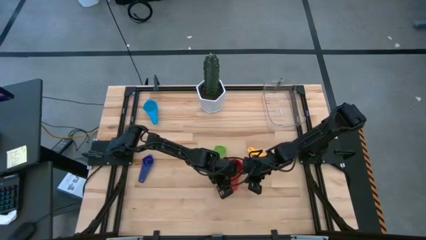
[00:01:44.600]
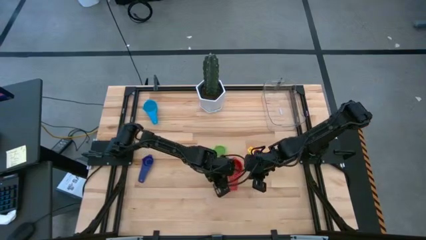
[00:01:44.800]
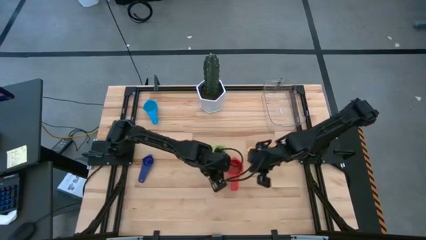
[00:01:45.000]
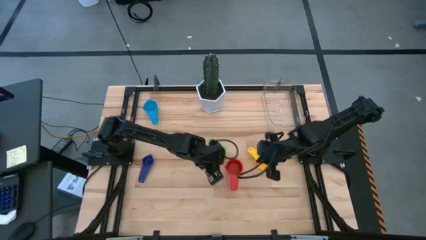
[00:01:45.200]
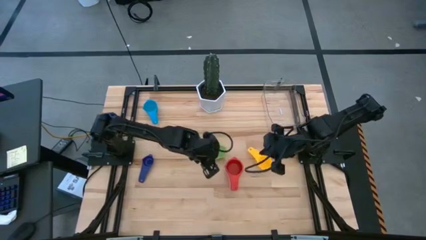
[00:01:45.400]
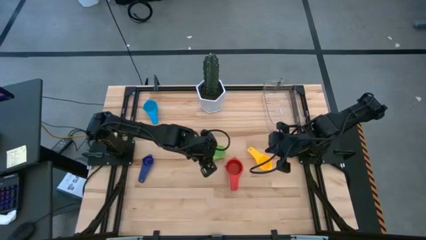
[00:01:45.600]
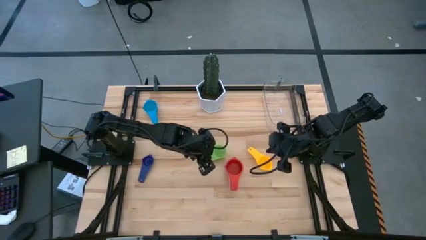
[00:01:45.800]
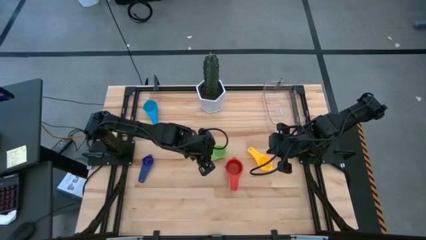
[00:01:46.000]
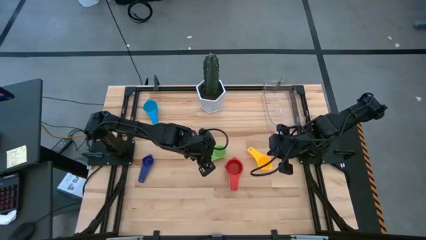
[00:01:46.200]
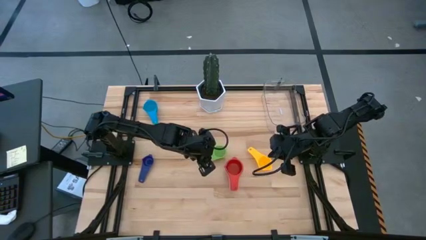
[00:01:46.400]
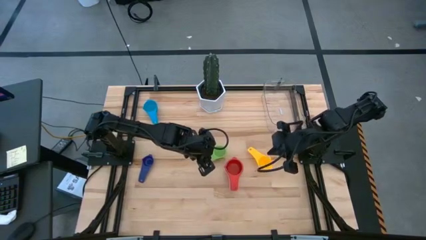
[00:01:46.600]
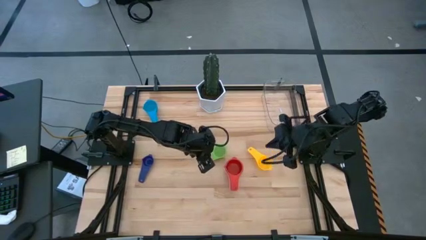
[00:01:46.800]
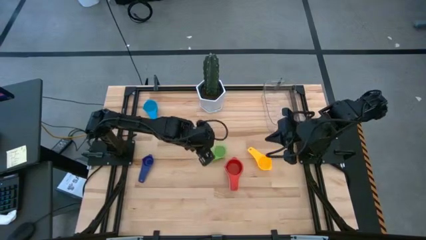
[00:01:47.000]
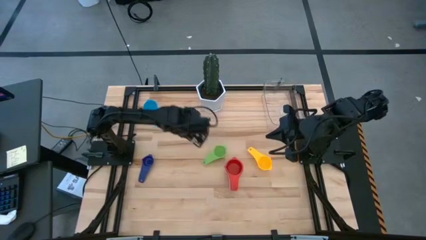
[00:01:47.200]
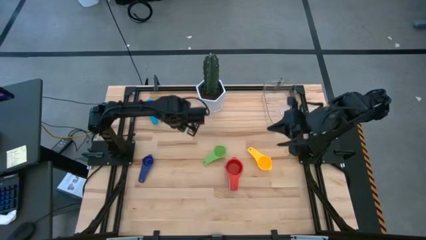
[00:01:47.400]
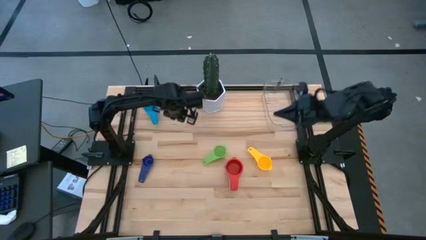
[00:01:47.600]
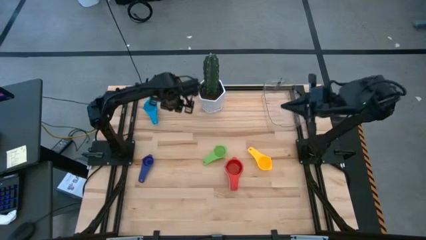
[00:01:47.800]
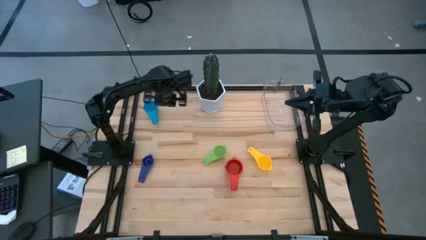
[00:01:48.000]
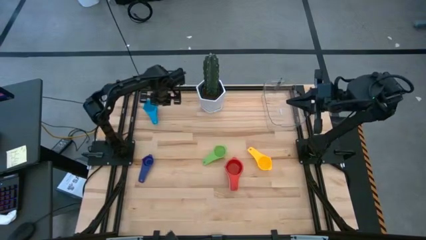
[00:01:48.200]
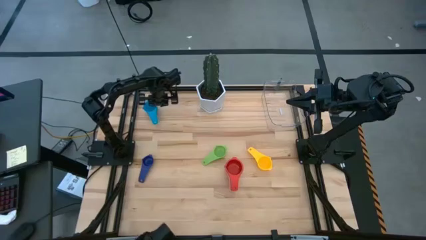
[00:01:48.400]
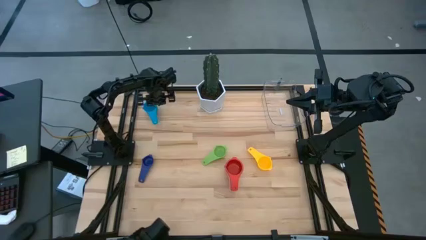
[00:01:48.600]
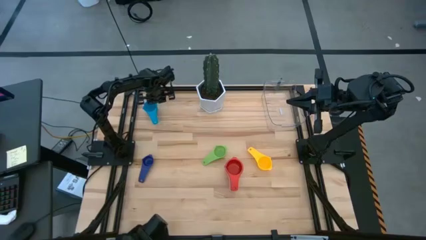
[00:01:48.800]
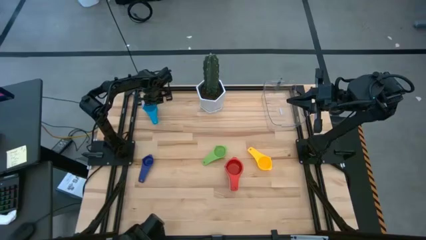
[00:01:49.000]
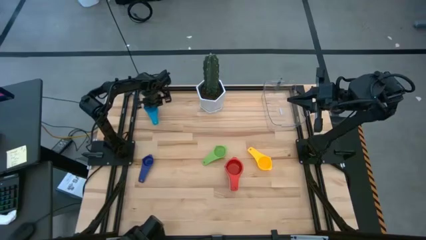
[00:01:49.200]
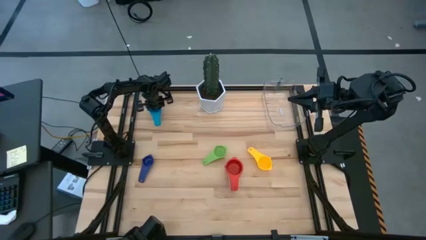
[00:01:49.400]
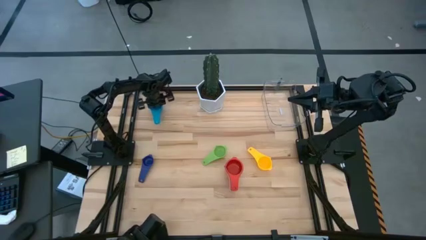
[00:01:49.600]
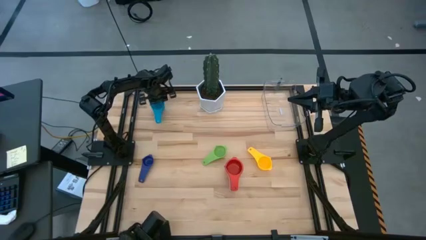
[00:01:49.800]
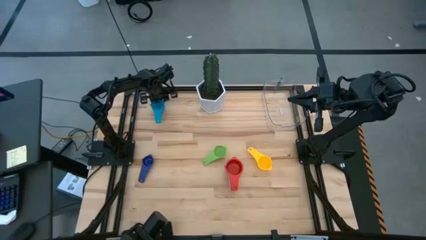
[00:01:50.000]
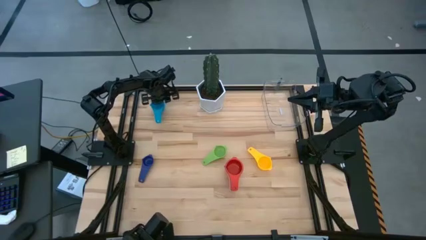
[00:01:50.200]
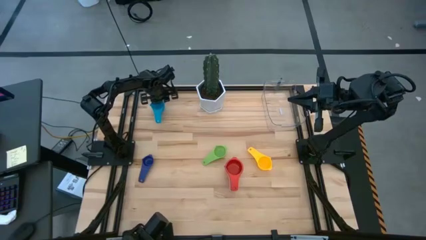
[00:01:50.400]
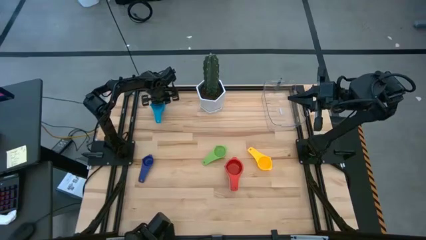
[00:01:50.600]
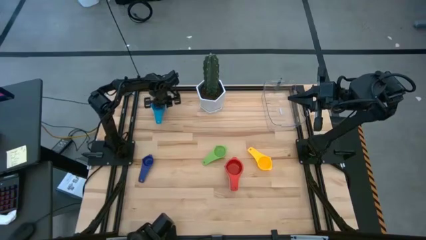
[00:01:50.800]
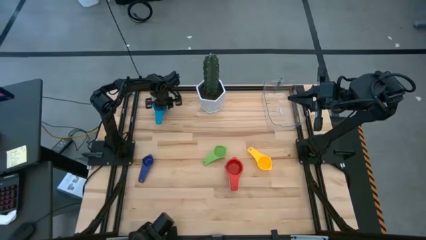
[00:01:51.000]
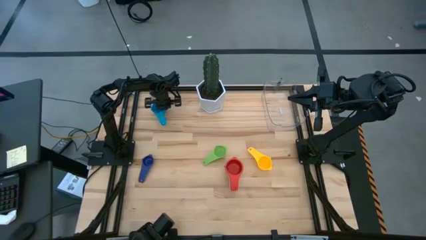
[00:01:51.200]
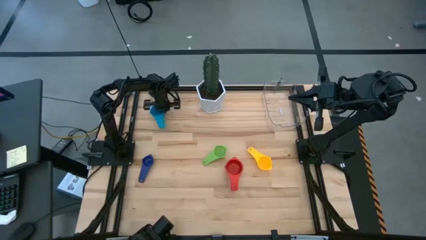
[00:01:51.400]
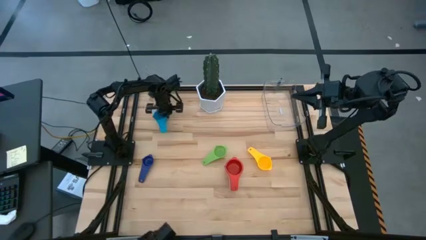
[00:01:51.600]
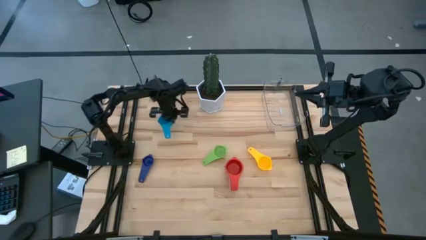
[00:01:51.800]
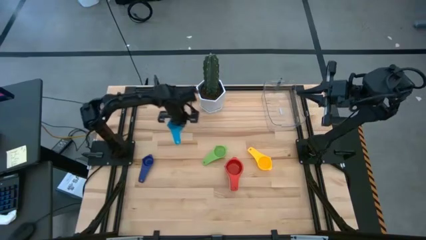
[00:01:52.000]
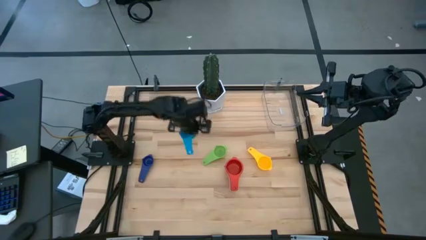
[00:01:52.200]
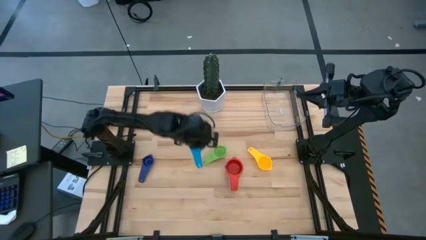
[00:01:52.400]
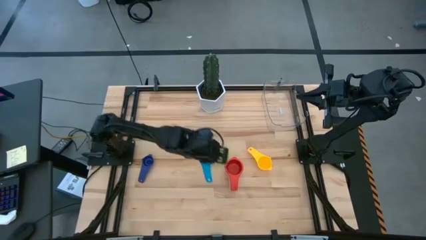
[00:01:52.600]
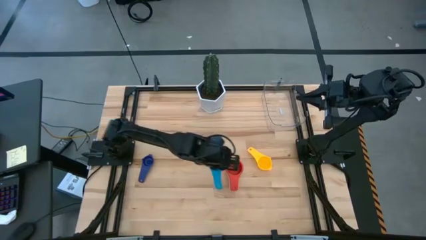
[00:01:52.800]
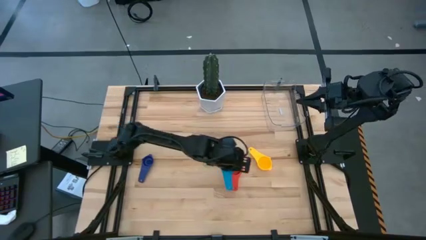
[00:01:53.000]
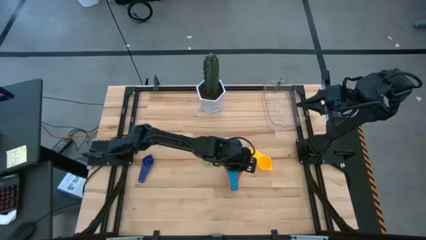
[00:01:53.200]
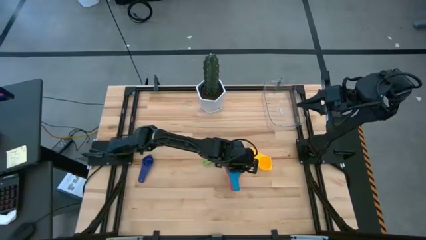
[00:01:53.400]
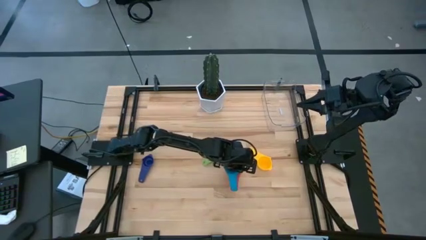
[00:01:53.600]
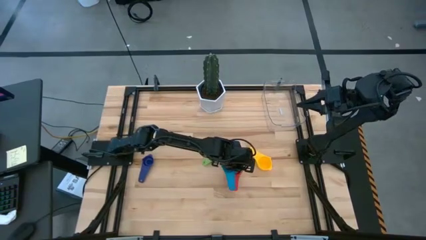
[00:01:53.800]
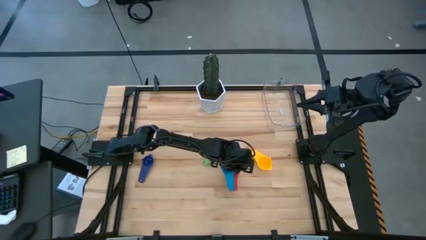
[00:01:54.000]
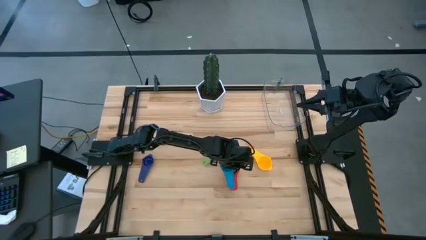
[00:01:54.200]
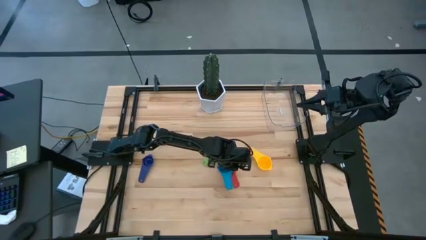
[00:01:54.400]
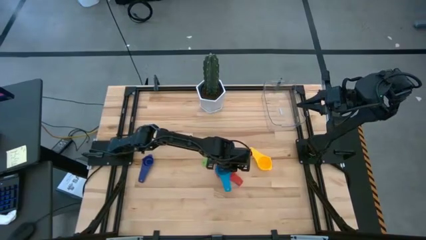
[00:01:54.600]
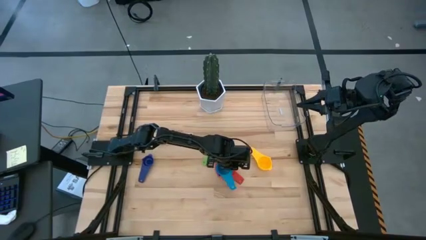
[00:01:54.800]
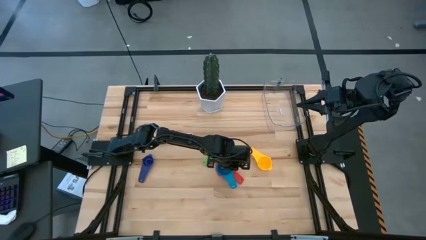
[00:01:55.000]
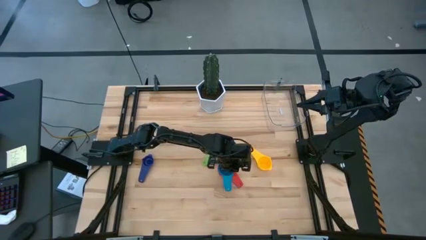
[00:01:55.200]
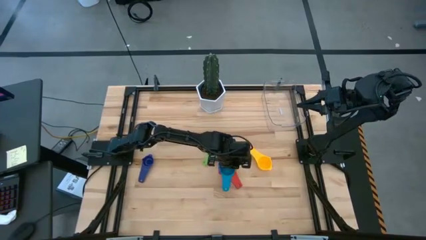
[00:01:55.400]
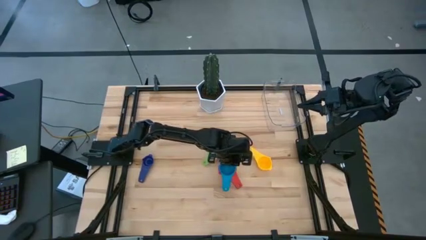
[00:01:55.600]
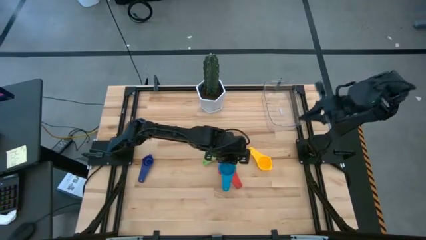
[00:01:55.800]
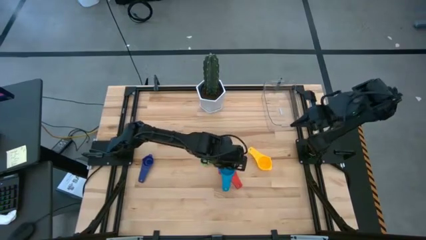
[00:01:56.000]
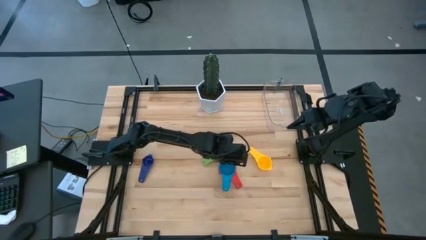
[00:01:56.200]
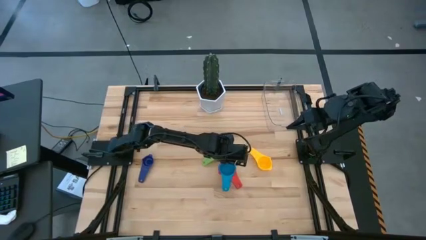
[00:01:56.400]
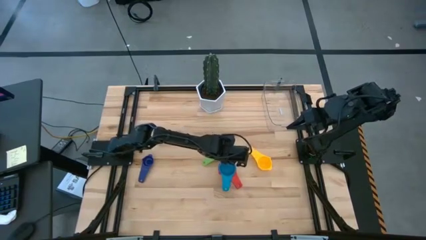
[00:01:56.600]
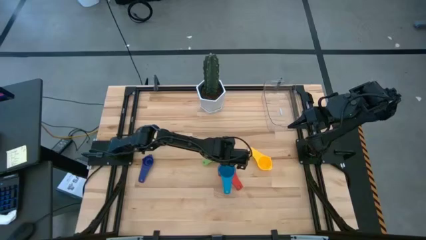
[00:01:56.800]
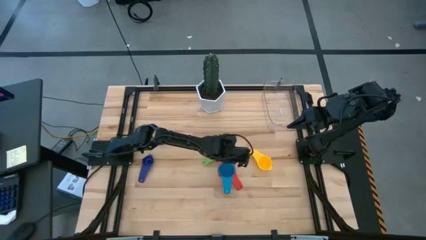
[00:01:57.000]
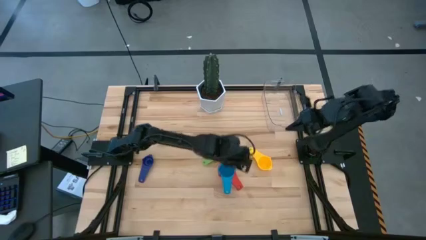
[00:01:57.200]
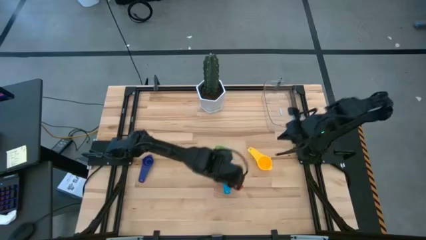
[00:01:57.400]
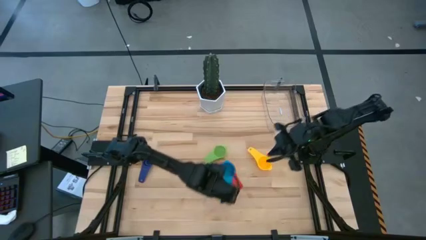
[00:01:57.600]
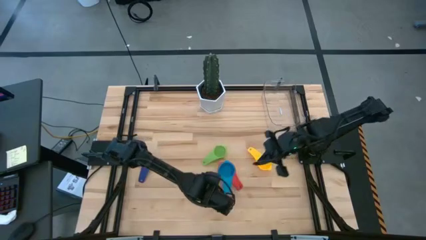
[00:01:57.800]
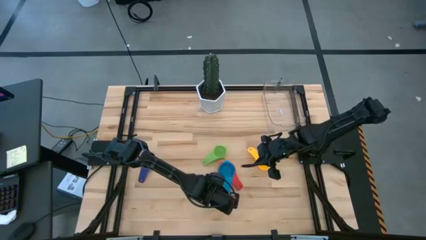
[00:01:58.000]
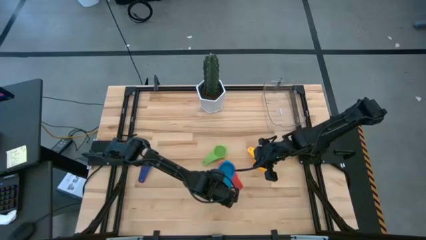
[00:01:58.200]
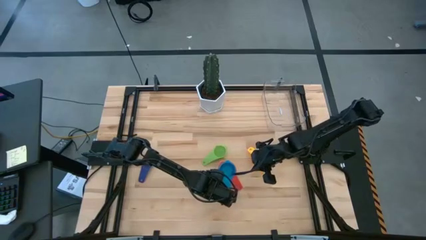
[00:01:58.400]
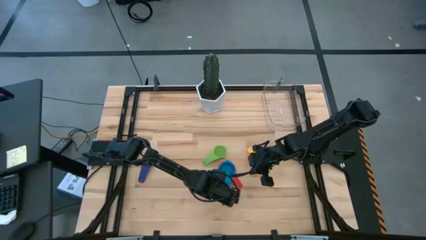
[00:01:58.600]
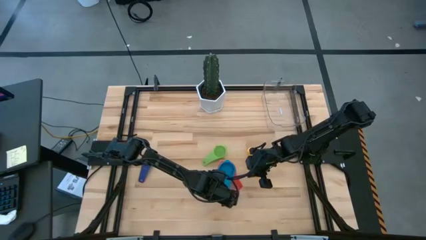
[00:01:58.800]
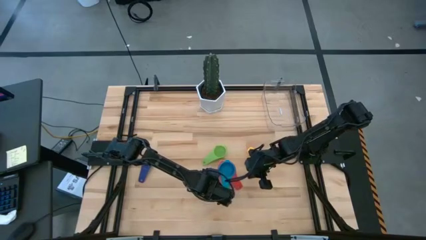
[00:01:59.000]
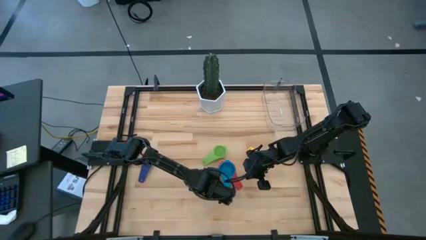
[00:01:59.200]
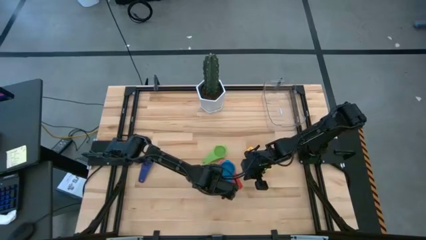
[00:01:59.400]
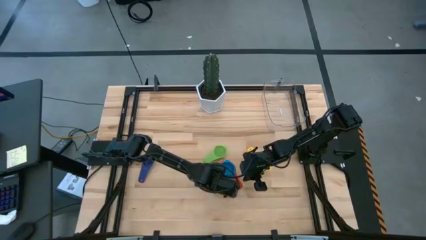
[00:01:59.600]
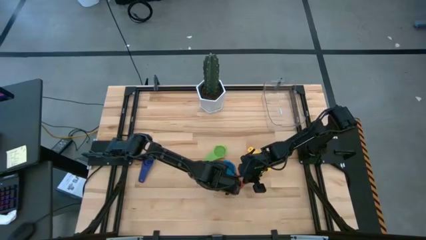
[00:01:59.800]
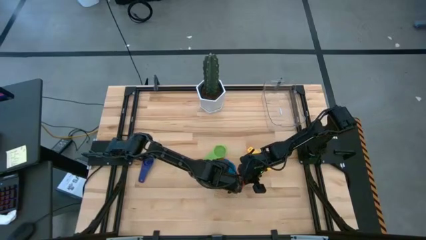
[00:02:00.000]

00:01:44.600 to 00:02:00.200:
Task: Nest measuring cups in basket
Stack the light blue measuring cup on top of the red measuring cups
